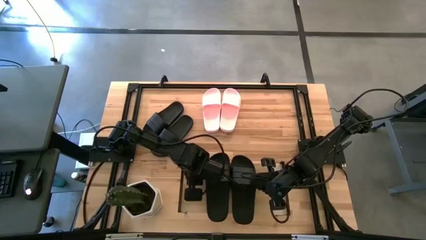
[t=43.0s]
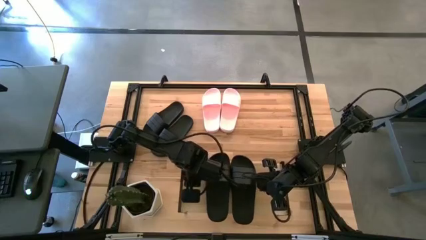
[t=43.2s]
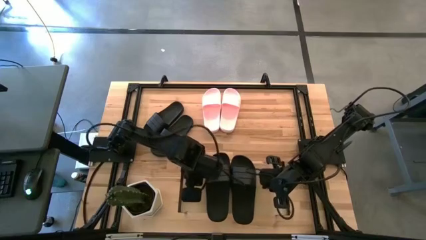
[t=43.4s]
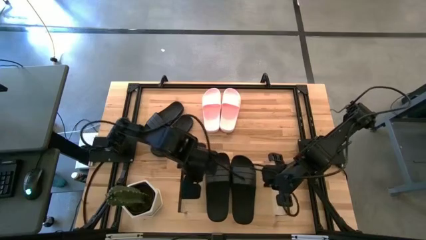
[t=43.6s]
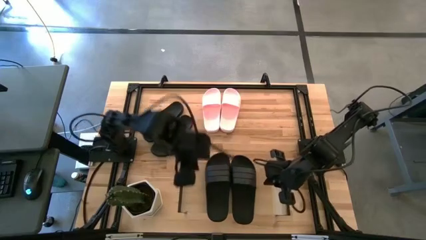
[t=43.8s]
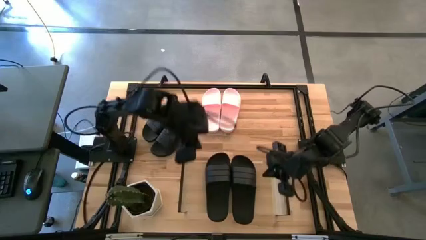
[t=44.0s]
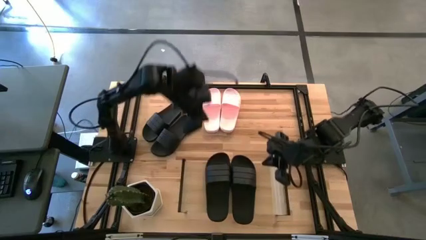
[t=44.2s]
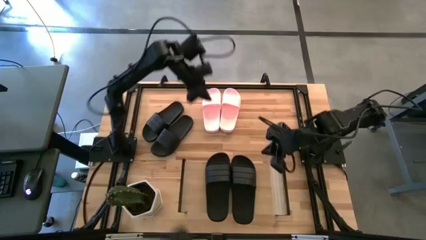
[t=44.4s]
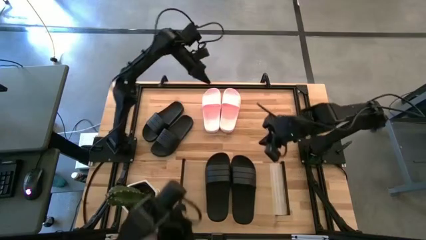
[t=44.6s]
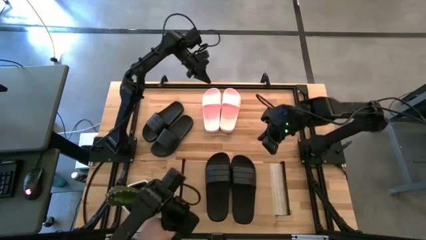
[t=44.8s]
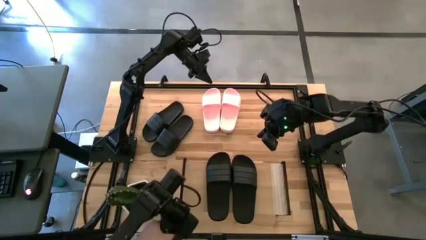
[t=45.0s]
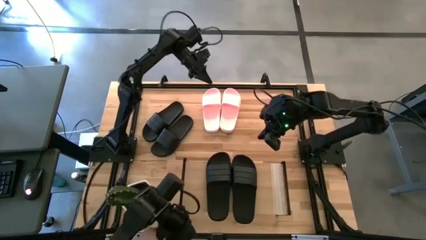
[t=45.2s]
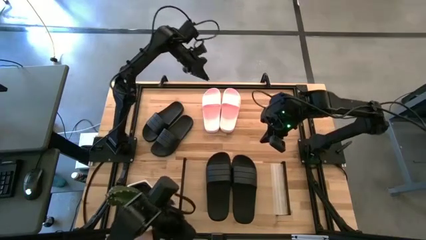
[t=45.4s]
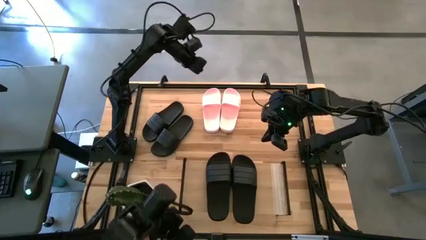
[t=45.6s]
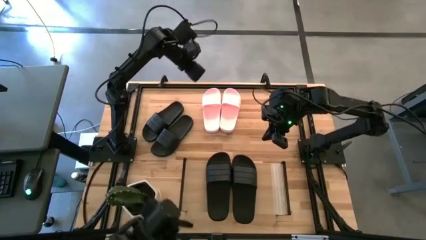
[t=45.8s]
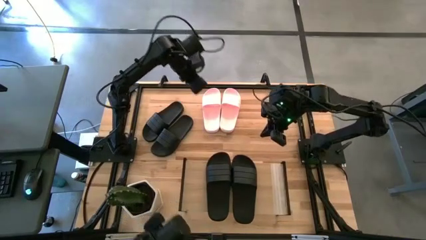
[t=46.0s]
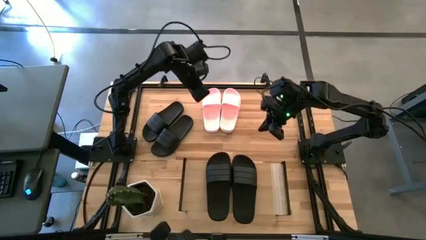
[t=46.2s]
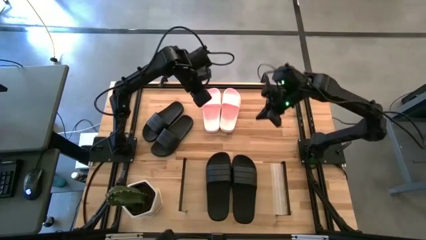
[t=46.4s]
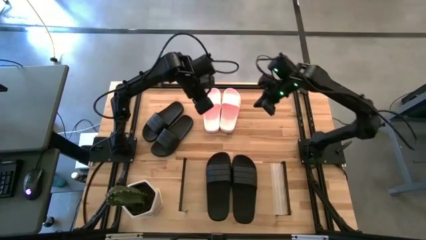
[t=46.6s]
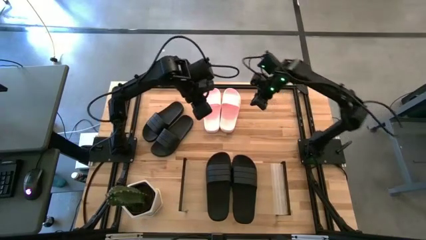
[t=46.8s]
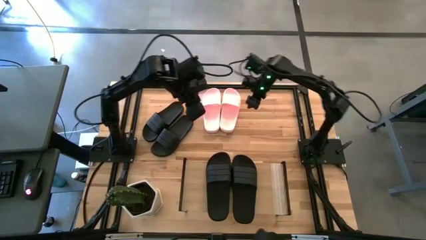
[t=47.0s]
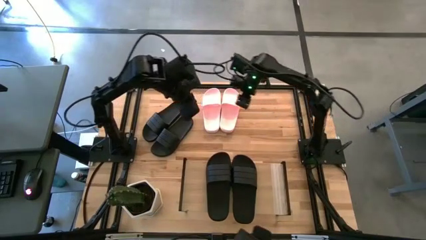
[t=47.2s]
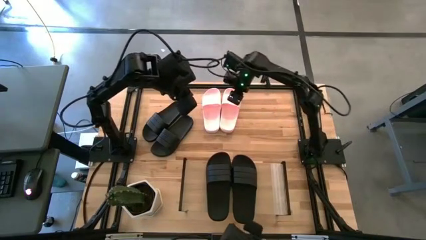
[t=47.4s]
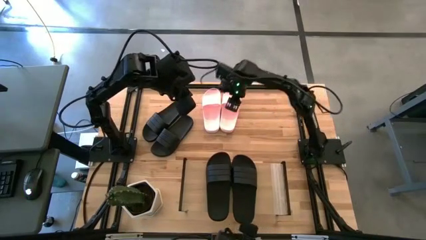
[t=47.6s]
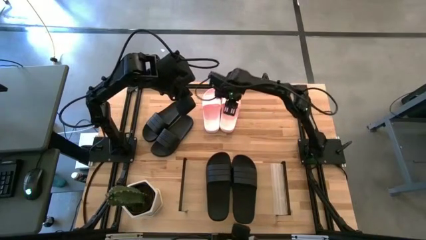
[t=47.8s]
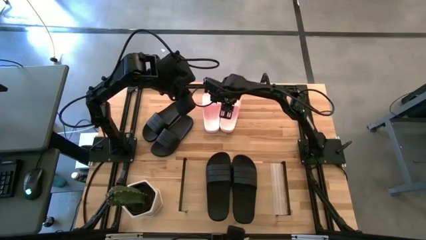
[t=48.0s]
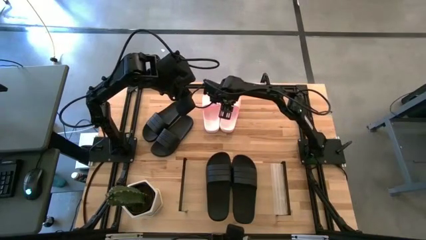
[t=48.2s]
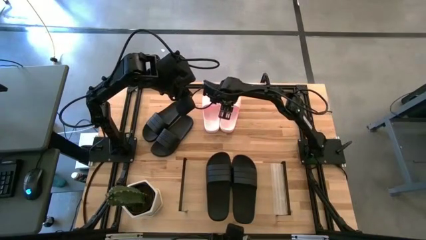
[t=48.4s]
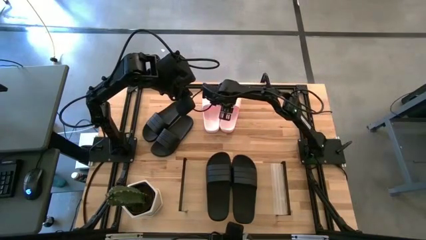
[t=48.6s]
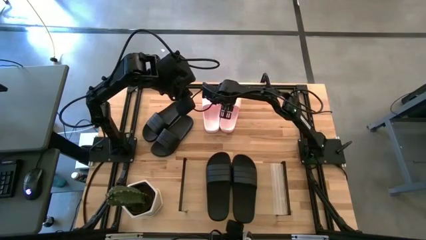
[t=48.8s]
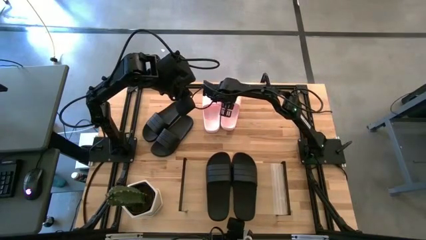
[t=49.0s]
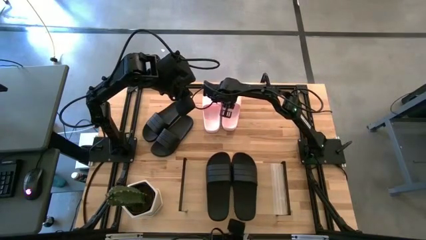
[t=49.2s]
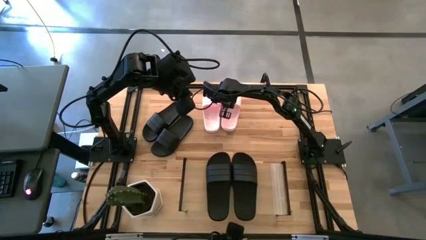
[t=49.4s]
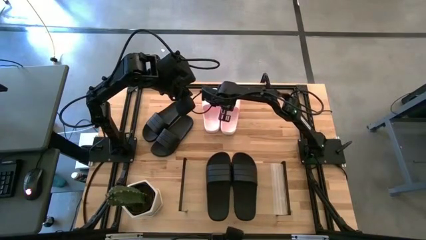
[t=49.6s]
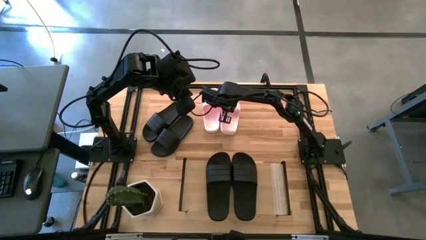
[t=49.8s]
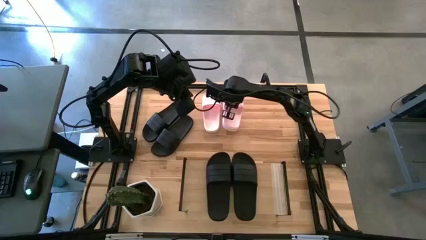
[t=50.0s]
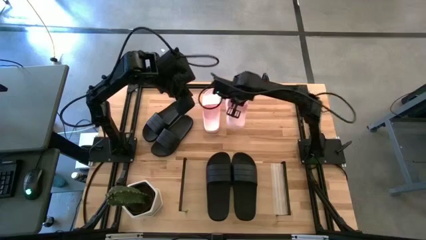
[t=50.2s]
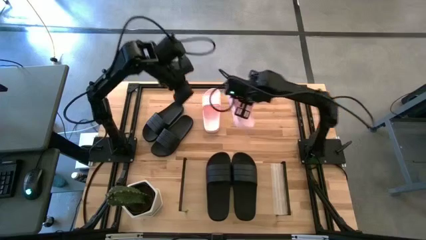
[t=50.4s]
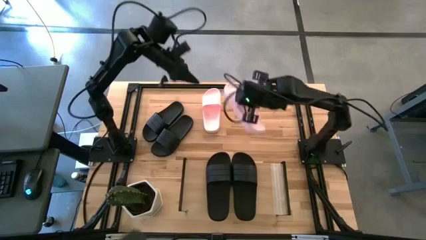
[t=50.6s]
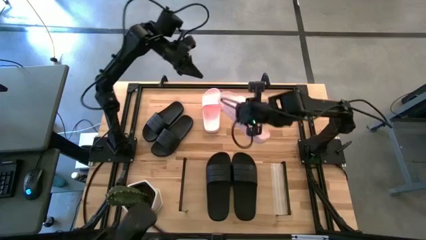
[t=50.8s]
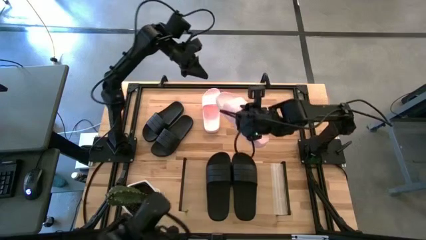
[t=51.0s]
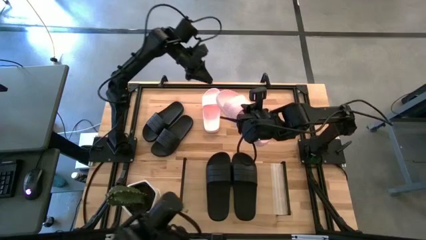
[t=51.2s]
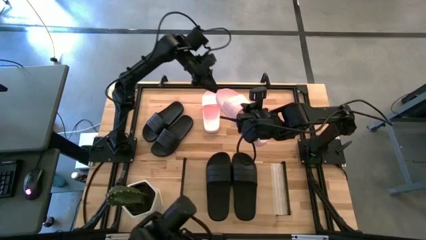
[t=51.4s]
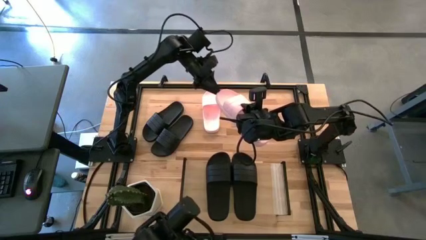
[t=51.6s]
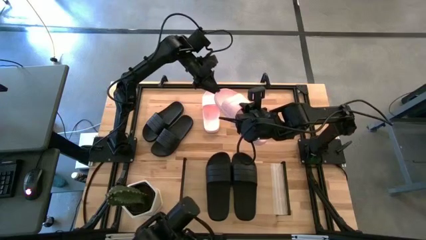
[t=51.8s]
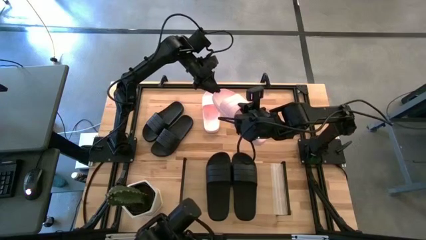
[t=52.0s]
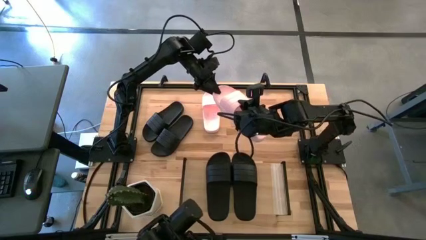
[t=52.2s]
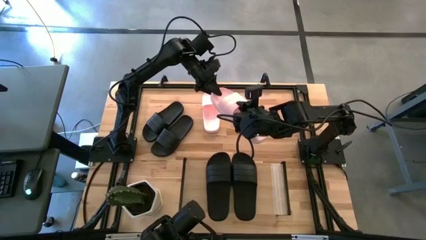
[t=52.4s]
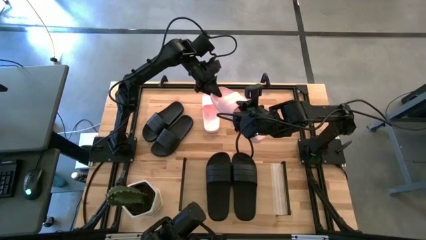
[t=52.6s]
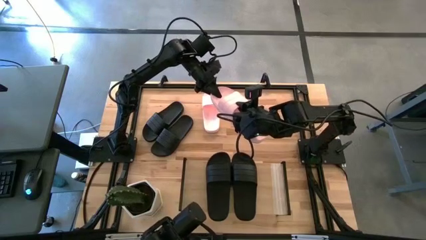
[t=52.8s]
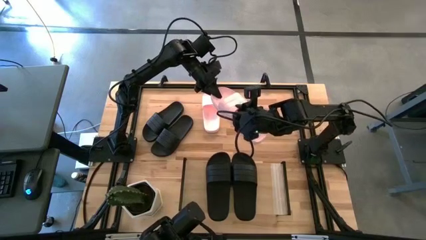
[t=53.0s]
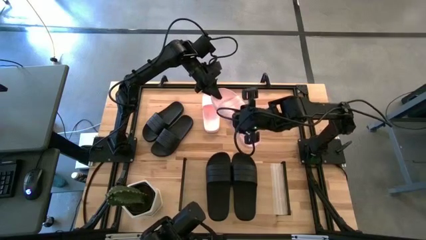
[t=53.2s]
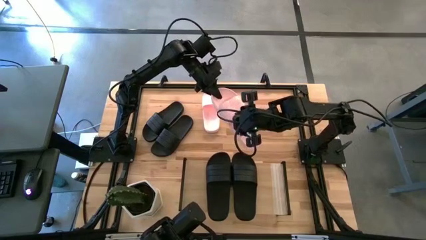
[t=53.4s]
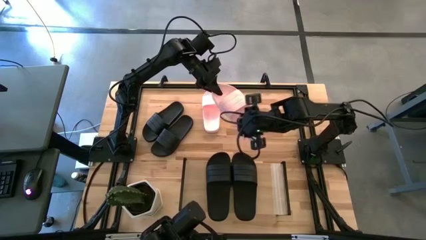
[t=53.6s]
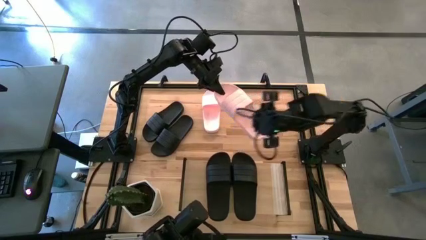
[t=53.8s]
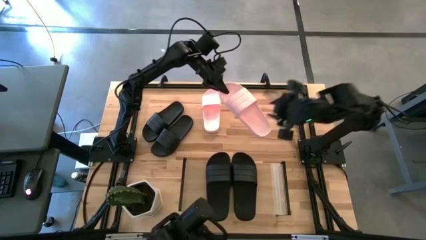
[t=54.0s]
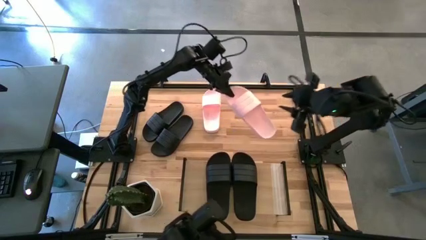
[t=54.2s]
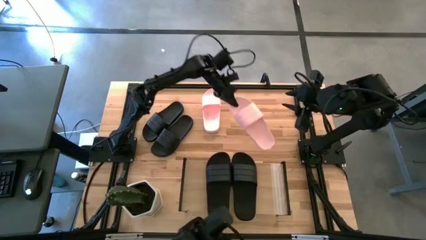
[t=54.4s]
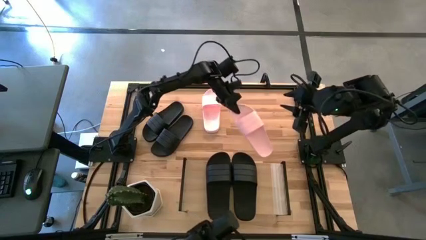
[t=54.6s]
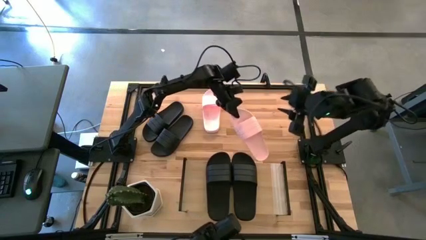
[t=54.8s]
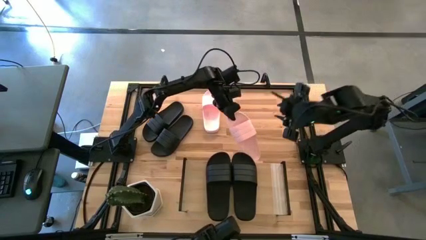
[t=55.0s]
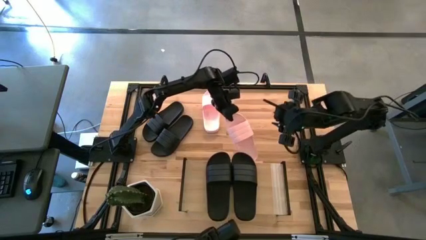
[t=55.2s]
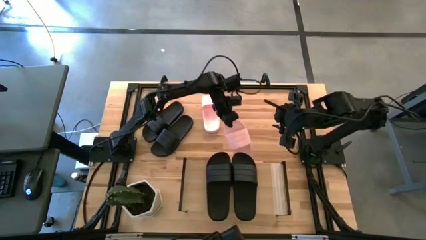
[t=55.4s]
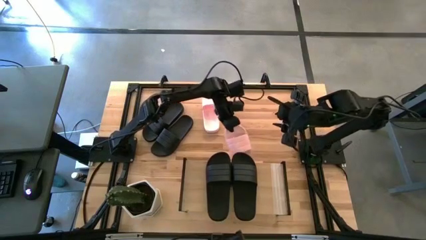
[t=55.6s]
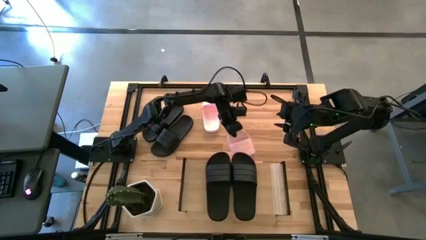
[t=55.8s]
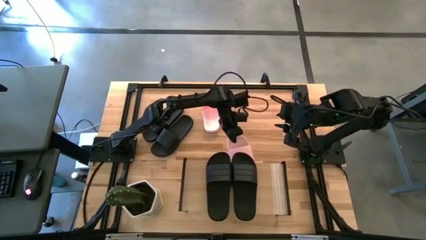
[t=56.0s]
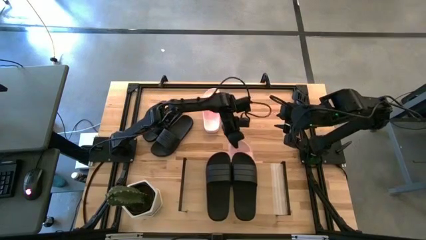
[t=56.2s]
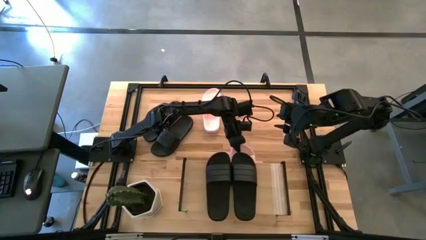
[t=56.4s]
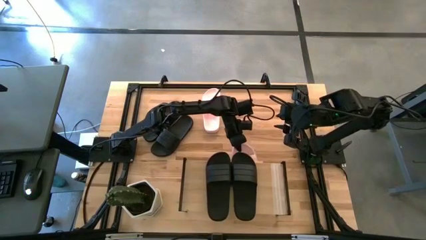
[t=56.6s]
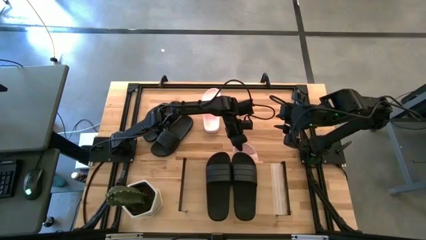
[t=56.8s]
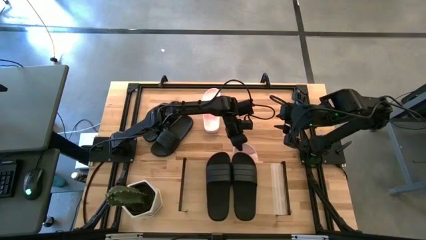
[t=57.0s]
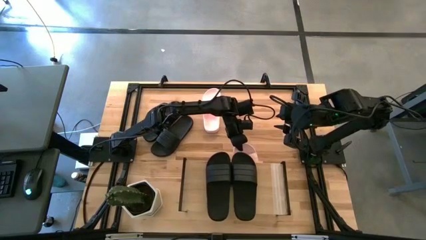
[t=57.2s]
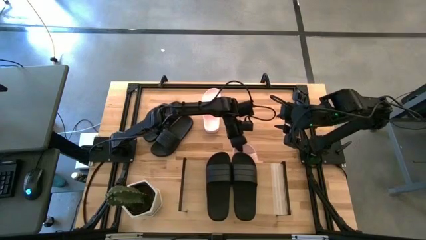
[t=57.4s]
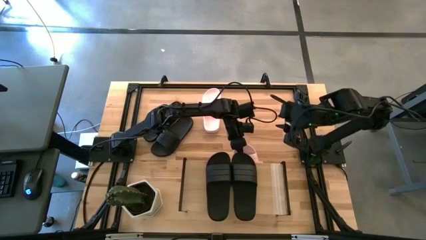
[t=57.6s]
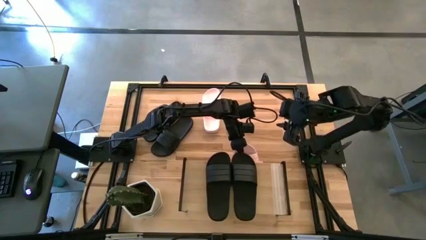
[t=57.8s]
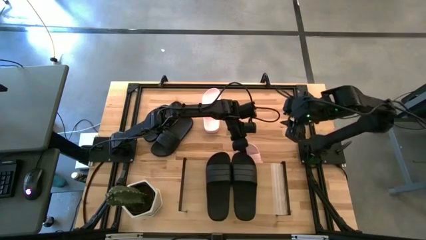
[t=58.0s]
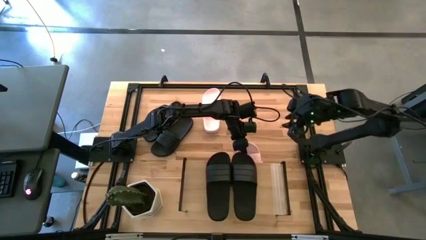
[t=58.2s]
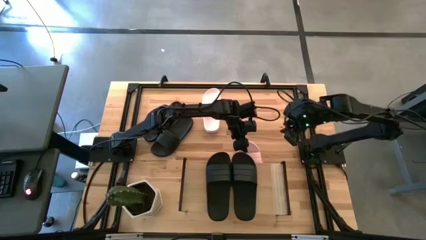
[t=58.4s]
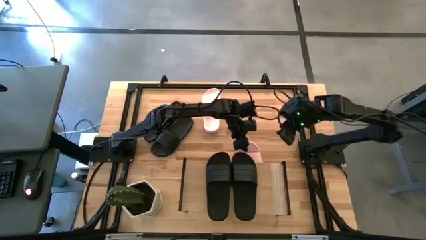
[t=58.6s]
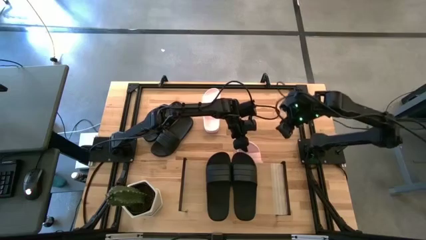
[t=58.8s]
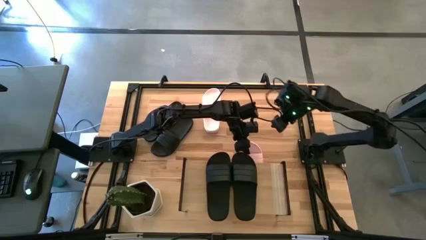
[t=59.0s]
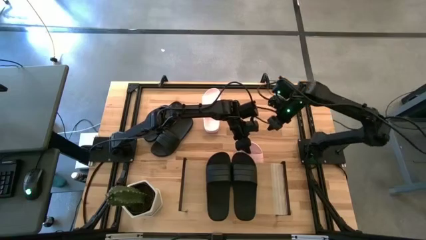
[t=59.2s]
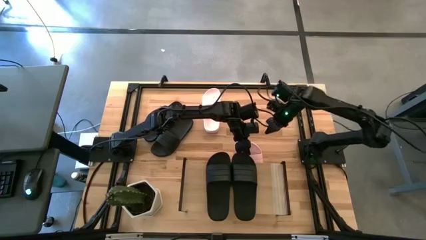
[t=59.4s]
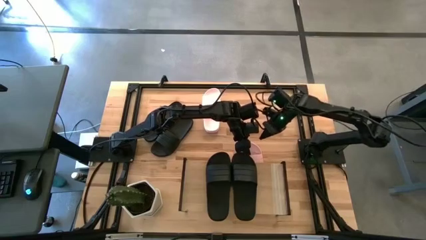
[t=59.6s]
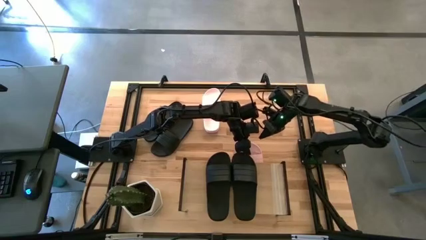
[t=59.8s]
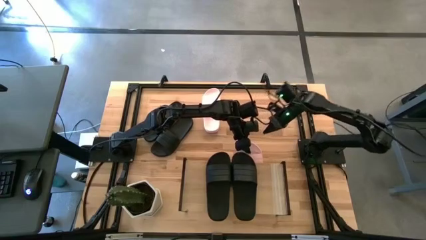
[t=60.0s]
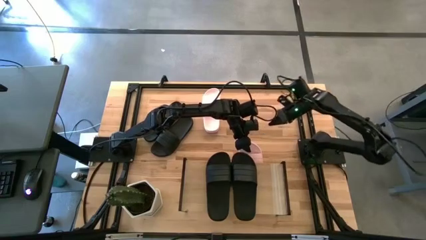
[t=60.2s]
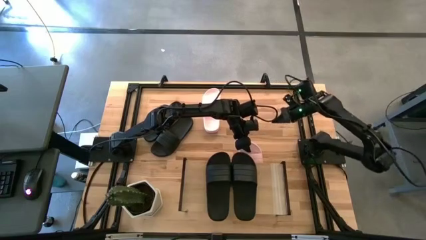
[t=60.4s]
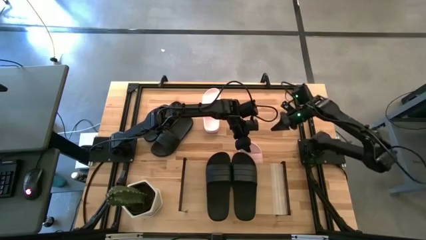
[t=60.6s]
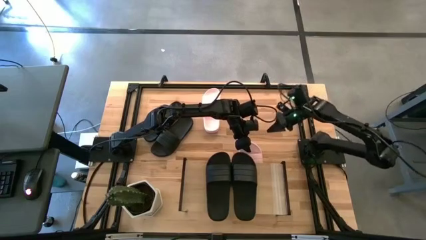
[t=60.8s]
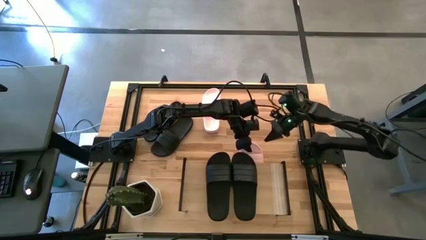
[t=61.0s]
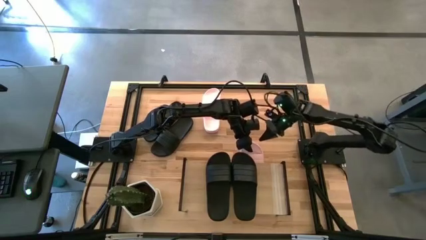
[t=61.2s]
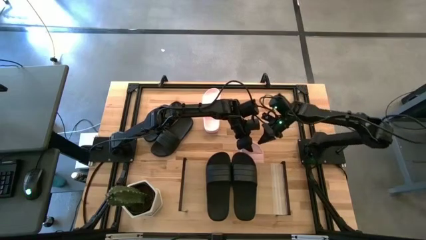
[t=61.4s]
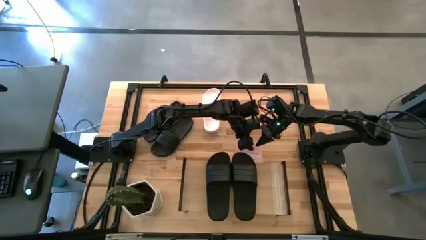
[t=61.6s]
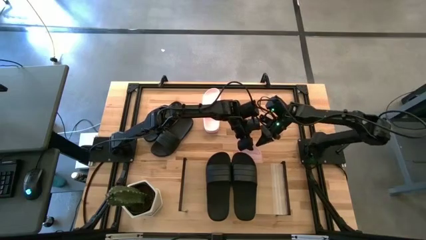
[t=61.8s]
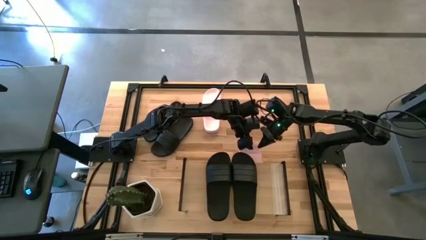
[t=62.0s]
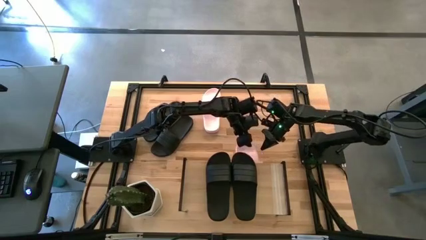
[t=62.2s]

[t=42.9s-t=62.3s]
Task: Pick and place slides into the shelf
Put the pink slipper under the shelf
